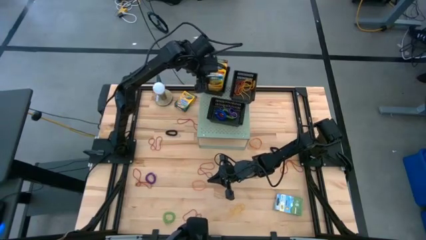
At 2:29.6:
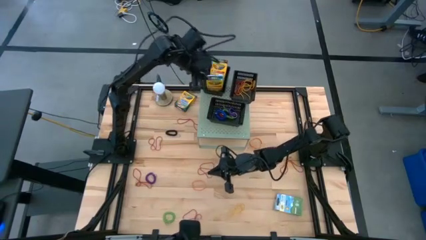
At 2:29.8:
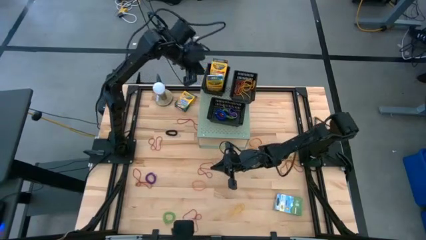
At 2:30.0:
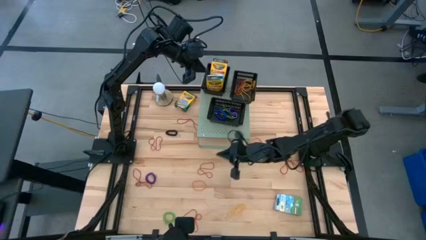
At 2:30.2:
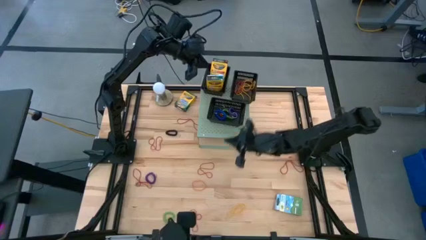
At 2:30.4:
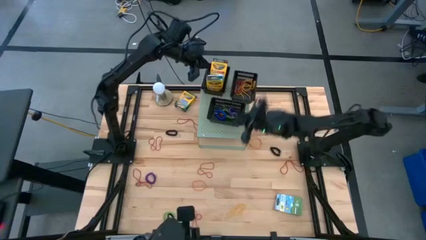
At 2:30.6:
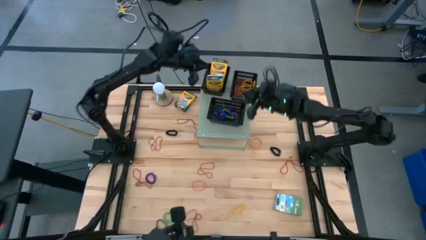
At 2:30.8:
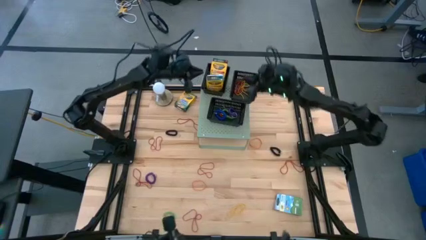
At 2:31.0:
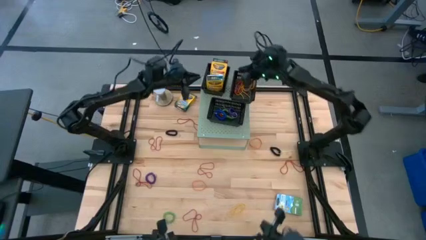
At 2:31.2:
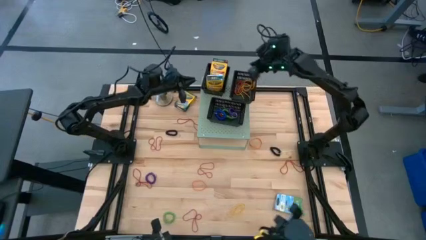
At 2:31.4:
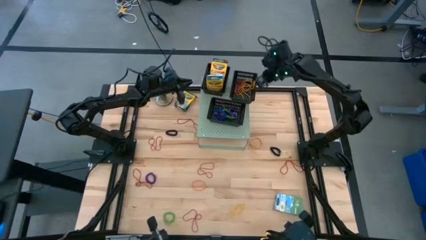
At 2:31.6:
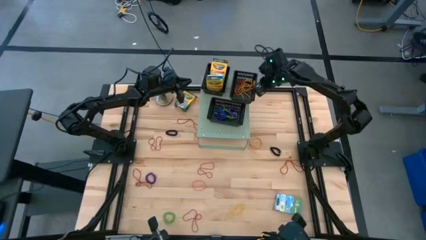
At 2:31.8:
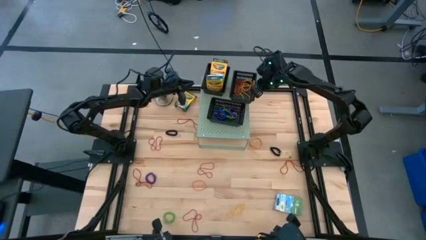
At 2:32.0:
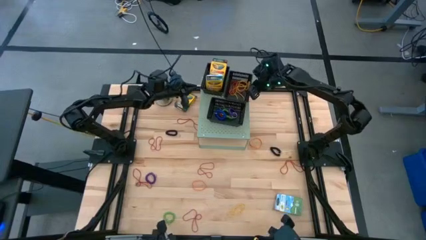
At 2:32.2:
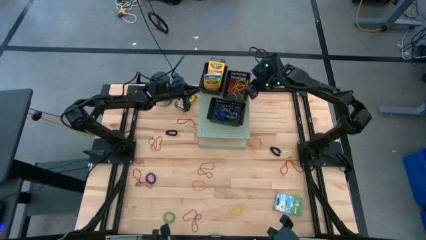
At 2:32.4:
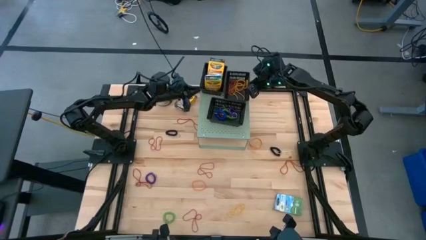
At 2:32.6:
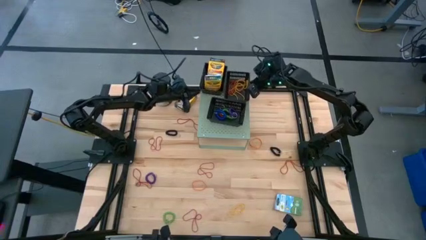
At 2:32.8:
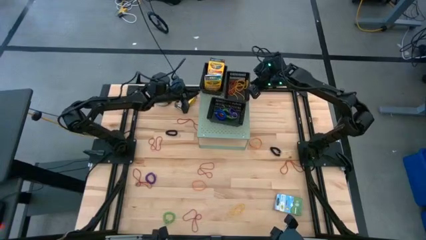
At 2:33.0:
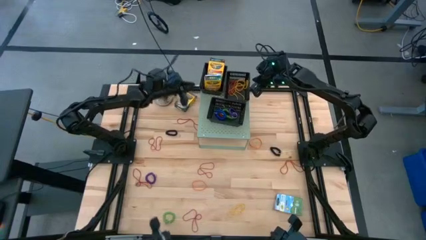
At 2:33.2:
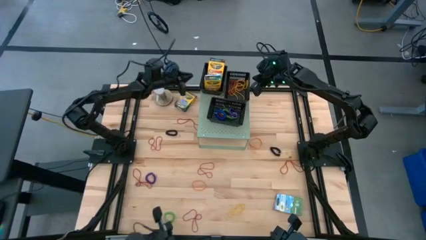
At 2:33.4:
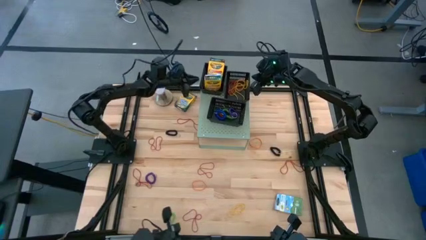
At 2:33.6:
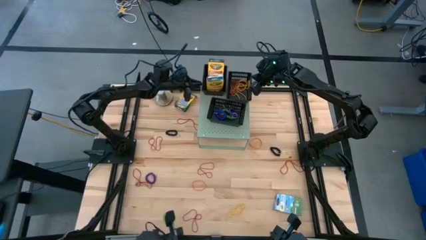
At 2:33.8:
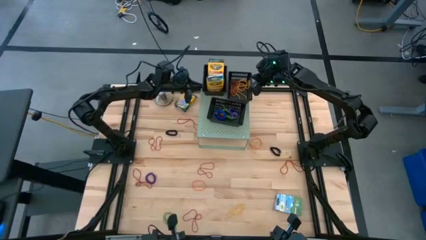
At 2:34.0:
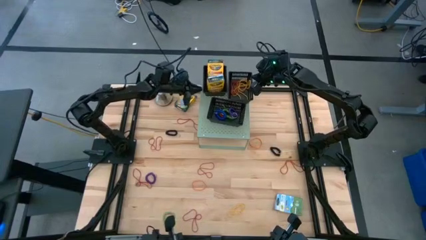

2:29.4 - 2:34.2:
Task: Pick & Place Office Desk Supplies
Adjust the black bins on the shelf

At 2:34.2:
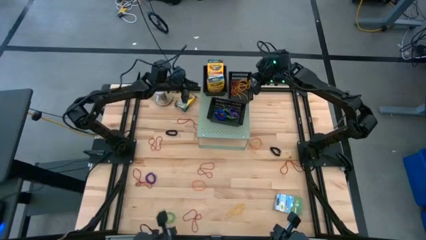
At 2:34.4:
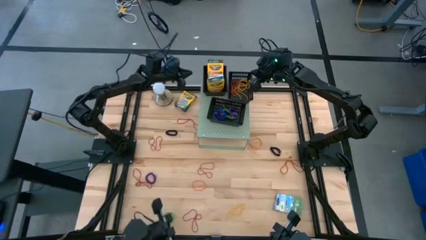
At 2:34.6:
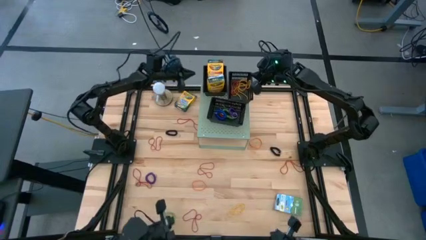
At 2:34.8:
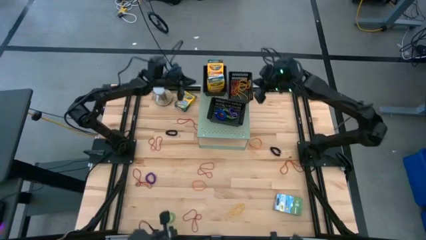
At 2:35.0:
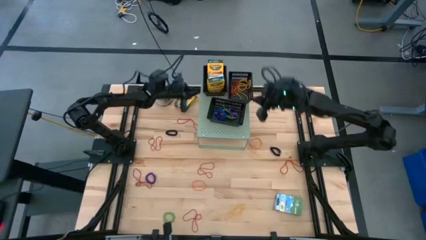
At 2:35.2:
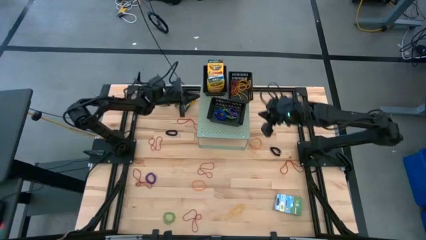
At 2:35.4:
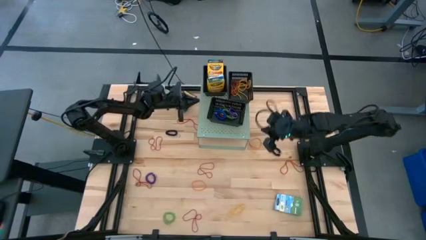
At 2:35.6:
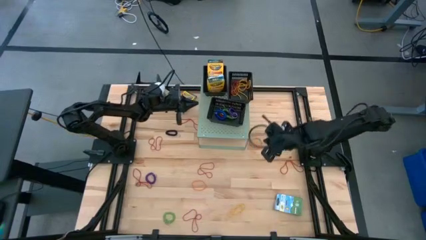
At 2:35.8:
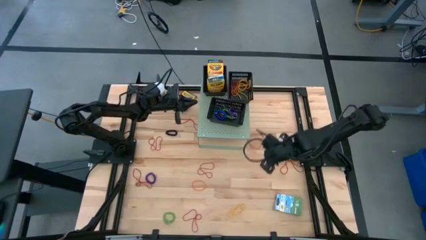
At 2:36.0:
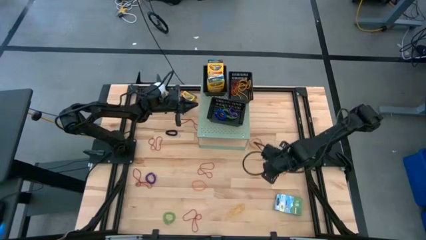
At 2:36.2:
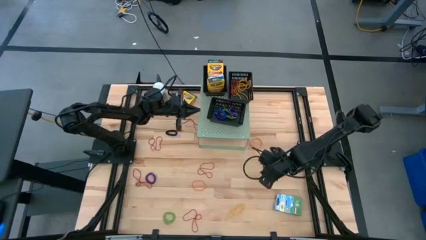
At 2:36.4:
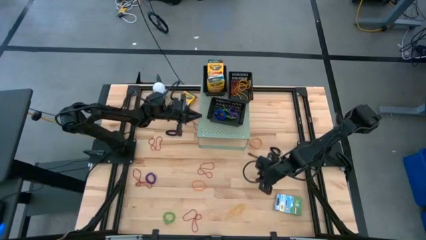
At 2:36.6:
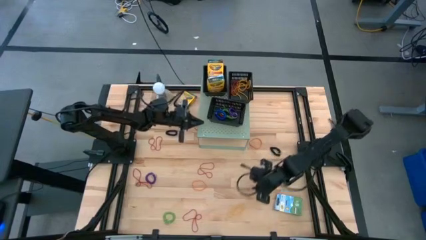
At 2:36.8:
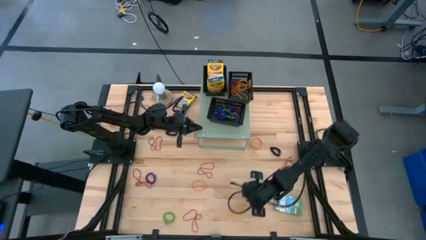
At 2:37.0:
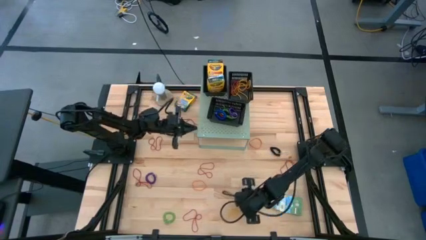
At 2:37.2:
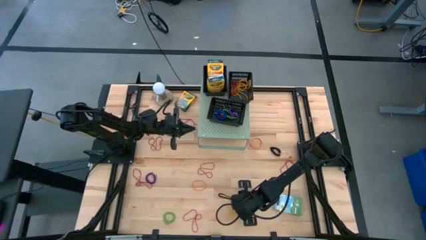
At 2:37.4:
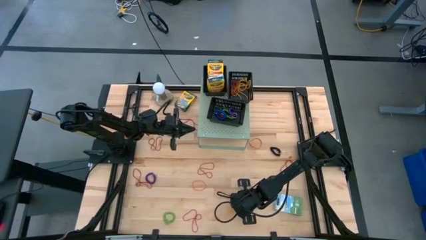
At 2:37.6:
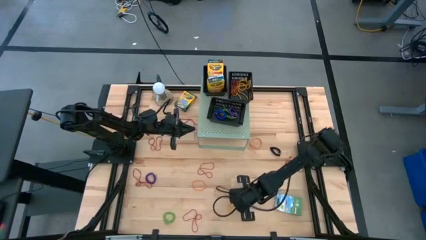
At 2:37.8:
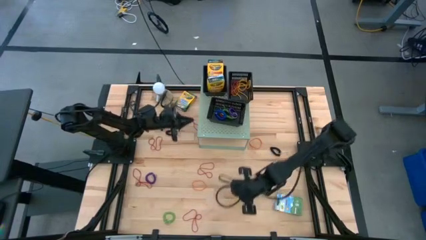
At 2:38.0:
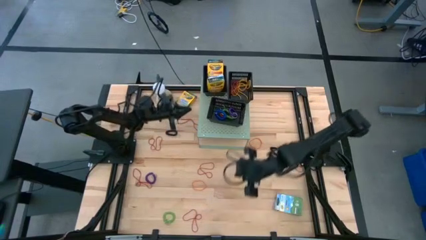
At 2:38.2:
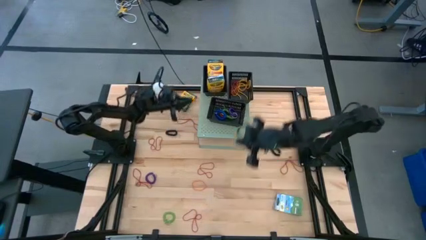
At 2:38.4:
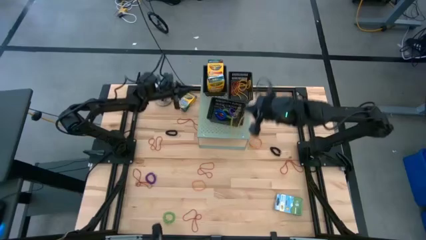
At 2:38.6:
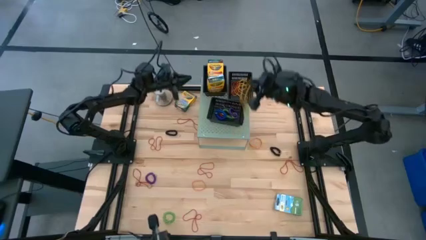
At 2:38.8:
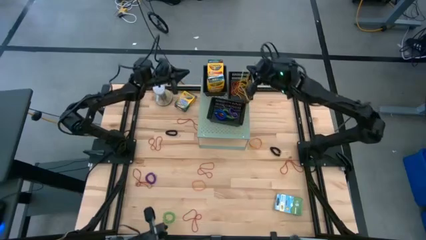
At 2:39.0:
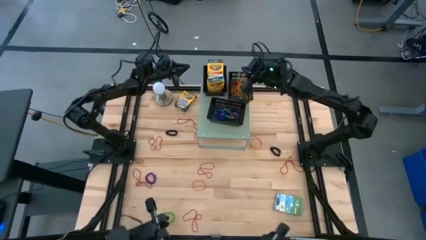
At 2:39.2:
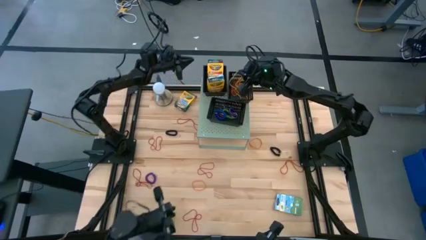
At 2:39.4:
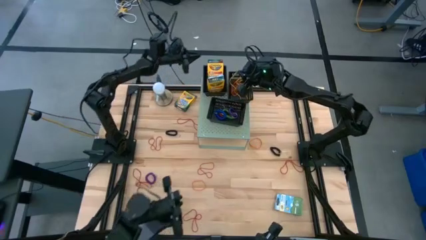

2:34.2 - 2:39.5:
Put the yellow rubber band into the top right black bin on the shelf

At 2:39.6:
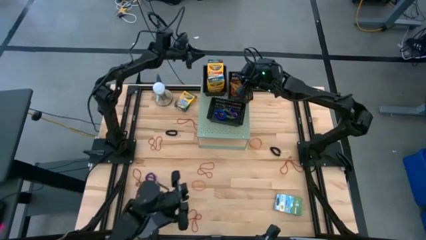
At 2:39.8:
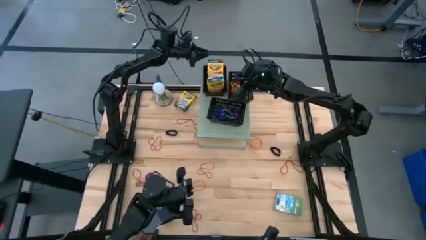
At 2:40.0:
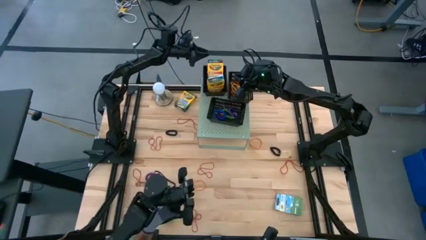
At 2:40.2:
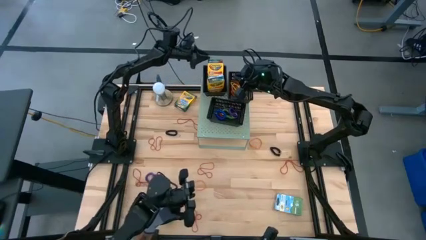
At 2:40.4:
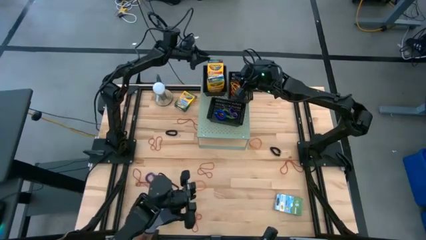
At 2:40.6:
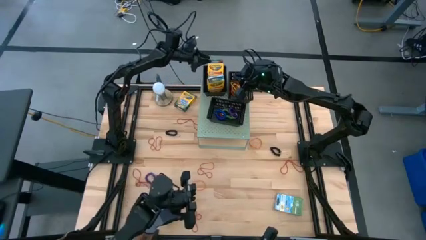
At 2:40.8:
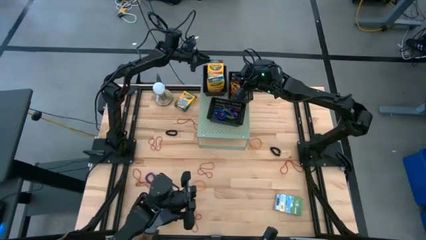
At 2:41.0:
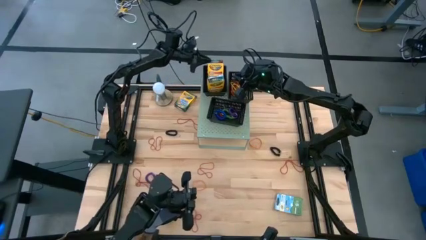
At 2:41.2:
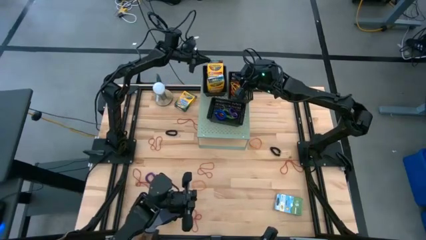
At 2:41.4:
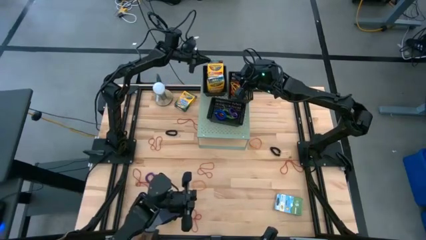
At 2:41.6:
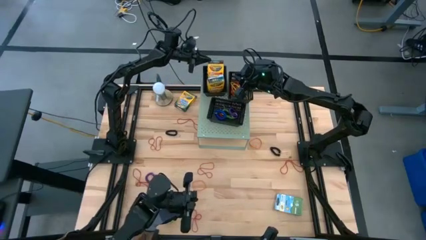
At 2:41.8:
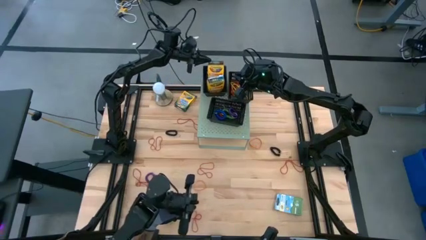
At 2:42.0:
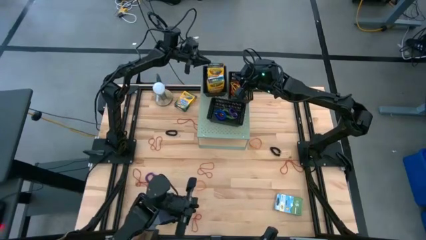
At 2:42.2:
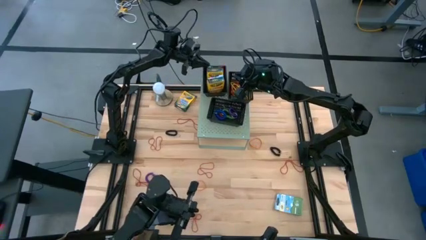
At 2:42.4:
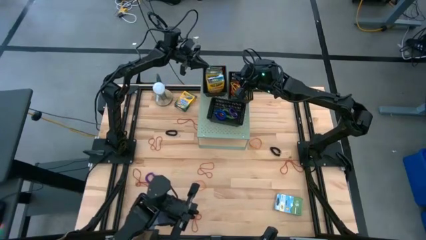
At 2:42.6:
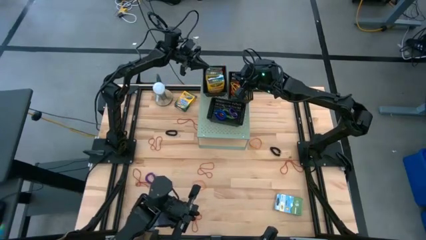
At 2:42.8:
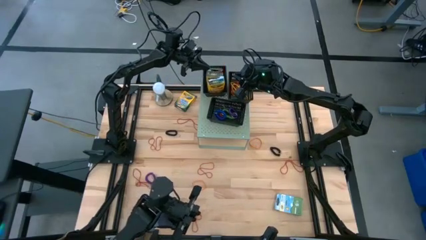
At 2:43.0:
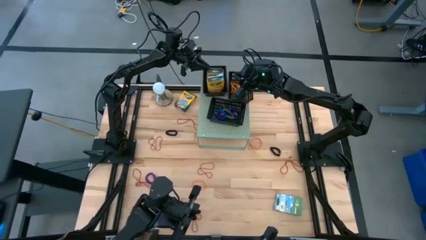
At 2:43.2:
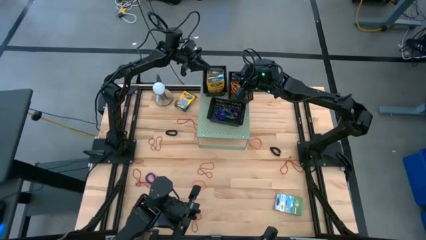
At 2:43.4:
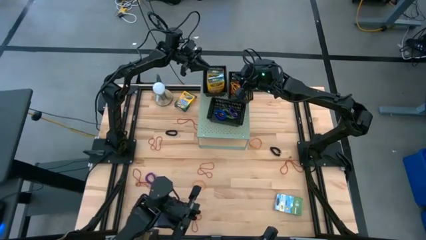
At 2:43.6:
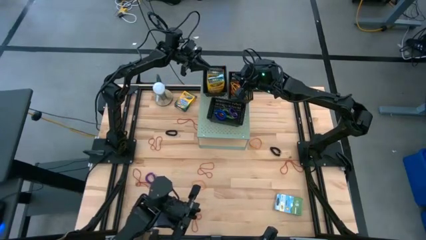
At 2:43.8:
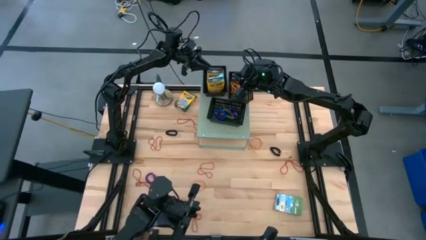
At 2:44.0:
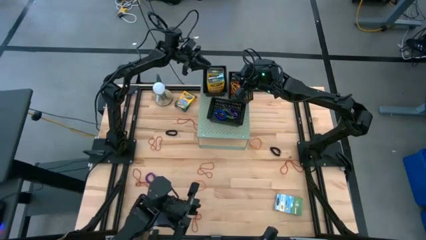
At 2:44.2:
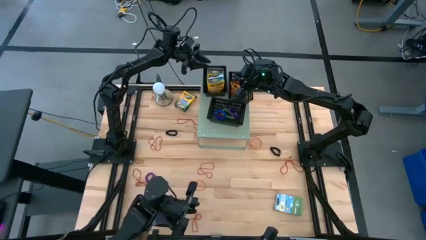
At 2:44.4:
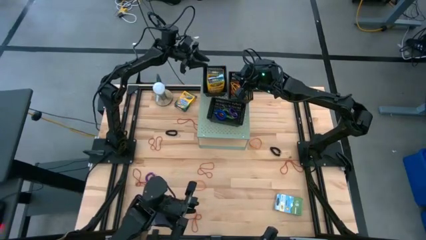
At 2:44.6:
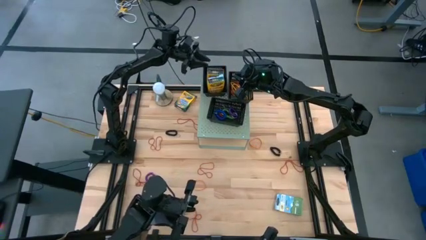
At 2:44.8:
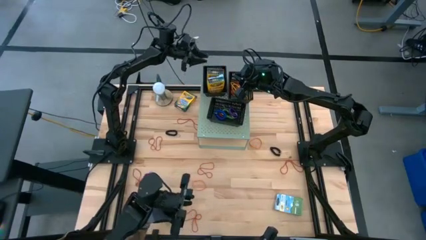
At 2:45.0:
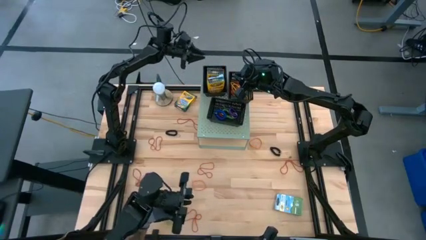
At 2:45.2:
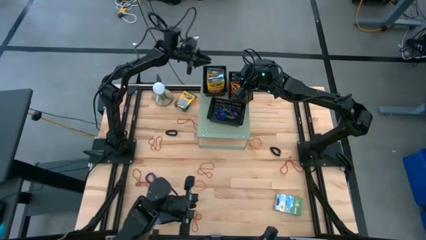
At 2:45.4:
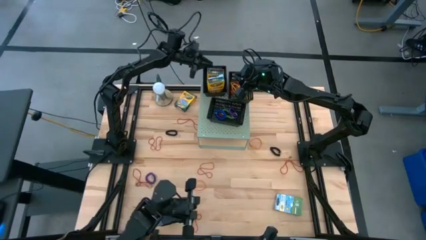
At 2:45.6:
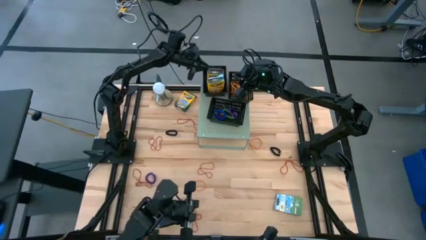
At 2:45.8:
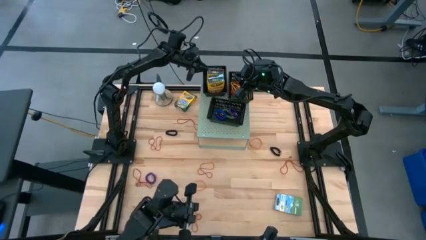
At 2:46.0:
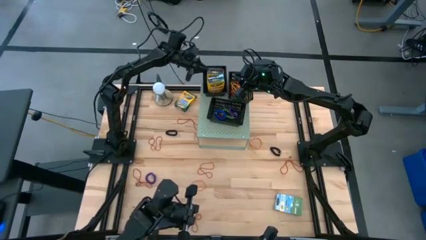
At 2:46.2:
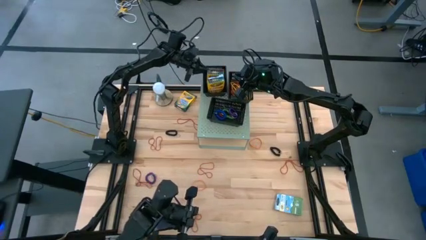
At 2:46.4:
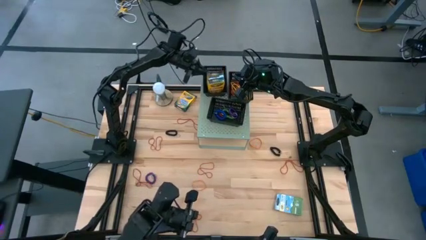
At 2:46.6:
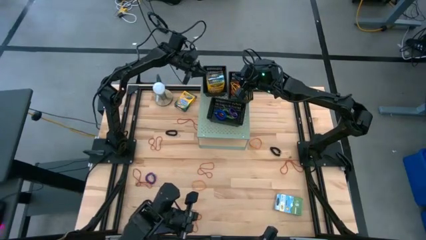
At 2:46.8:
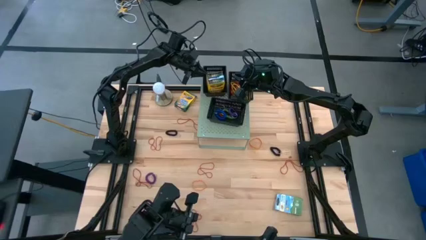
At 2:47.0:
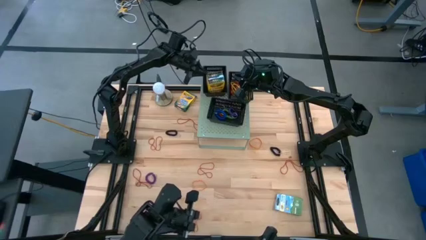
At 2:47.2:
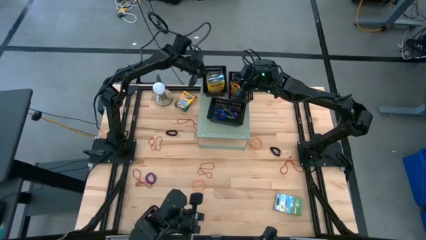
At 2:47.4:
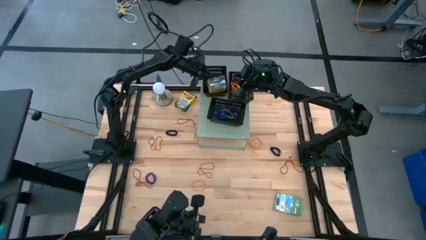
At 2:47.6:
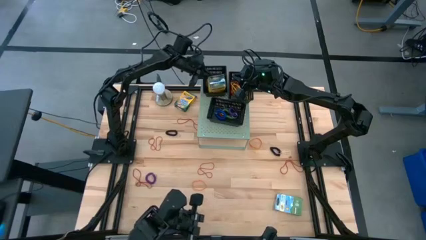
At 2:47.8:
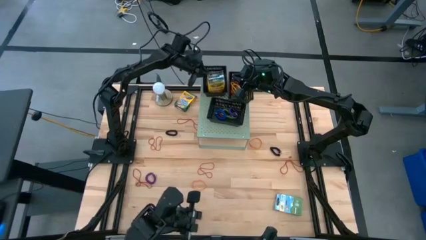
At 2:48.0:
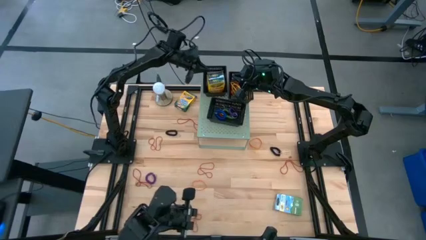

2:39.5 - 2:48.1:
Adjust the yellow crayon box on the top left black bin on the shelf
